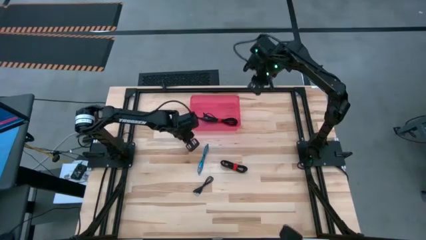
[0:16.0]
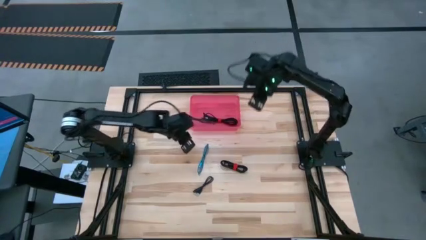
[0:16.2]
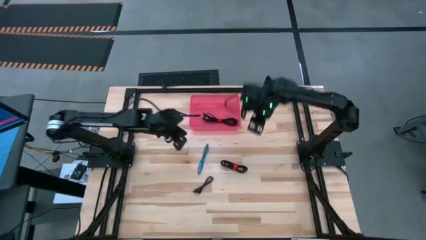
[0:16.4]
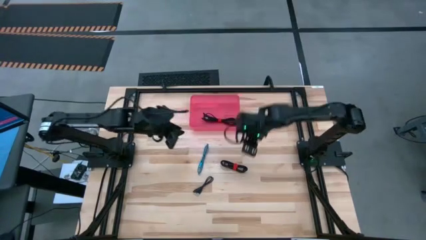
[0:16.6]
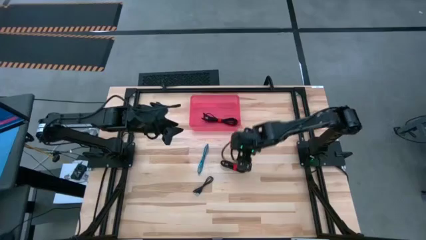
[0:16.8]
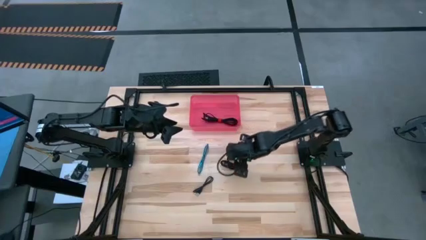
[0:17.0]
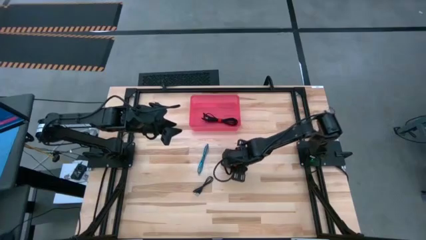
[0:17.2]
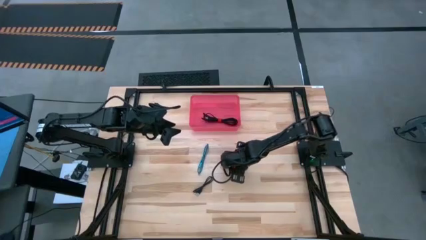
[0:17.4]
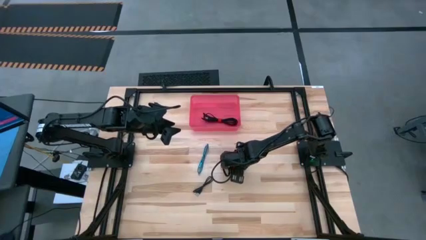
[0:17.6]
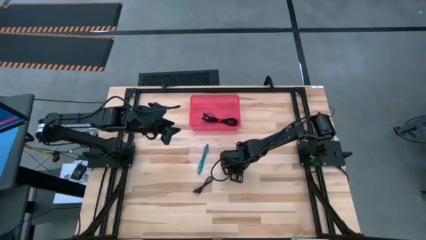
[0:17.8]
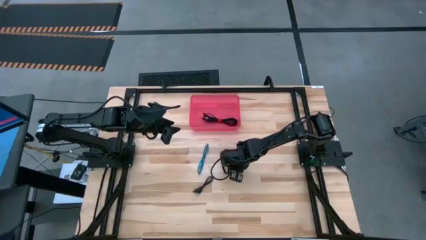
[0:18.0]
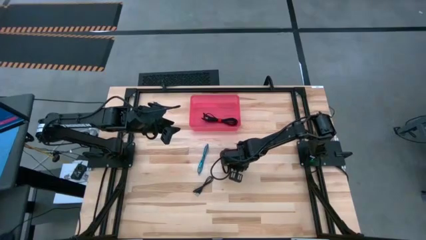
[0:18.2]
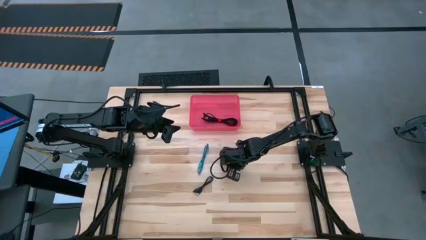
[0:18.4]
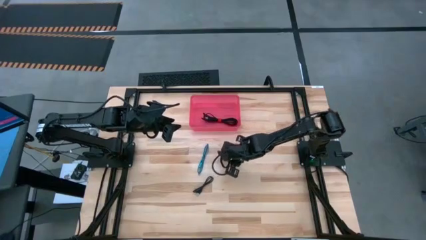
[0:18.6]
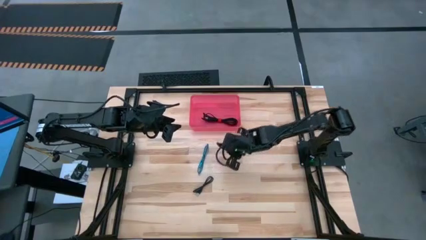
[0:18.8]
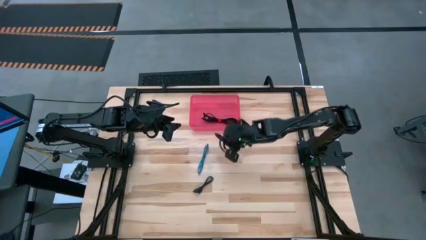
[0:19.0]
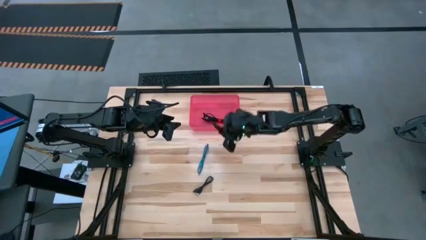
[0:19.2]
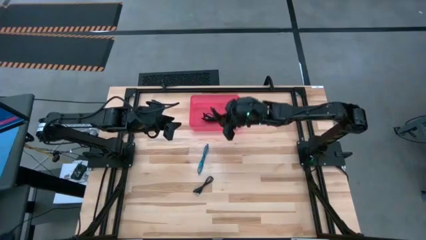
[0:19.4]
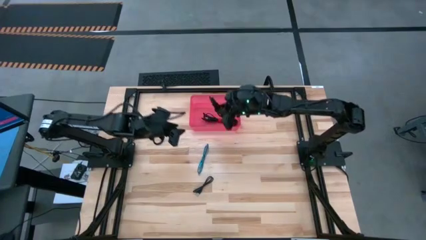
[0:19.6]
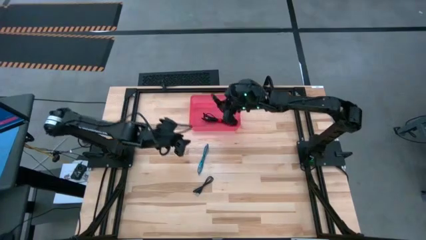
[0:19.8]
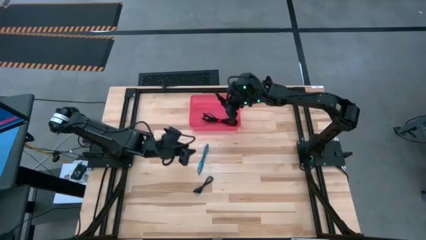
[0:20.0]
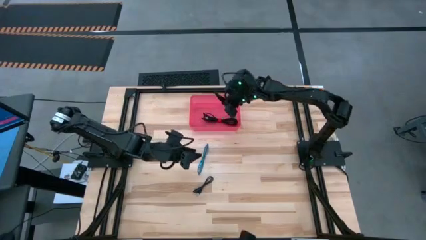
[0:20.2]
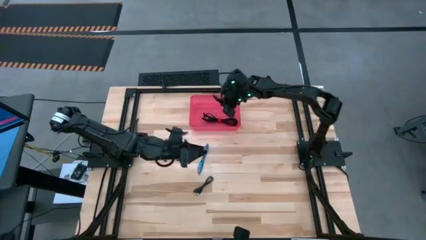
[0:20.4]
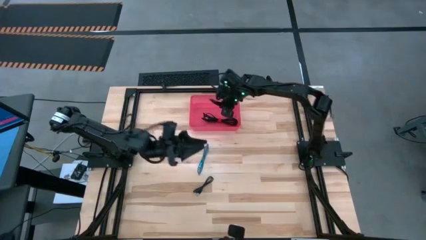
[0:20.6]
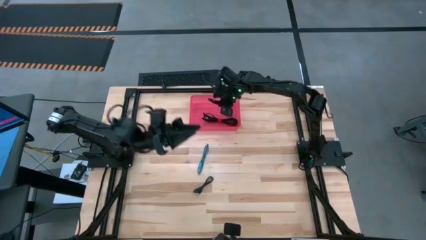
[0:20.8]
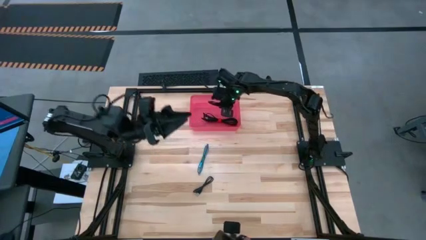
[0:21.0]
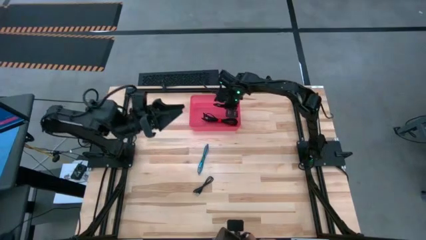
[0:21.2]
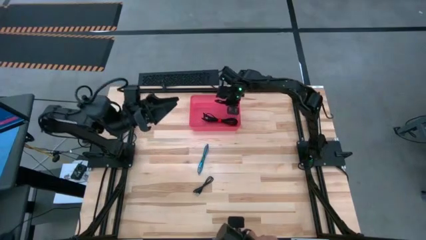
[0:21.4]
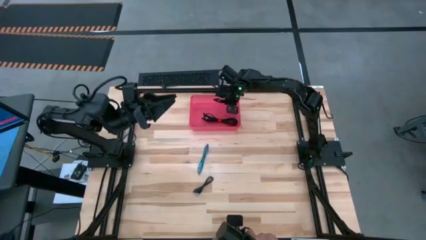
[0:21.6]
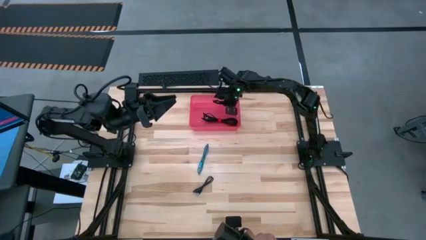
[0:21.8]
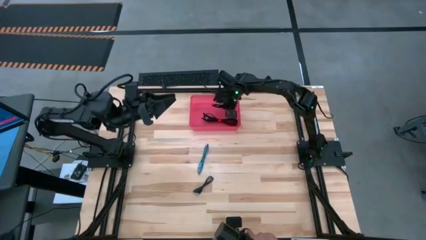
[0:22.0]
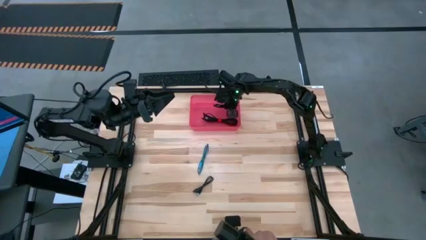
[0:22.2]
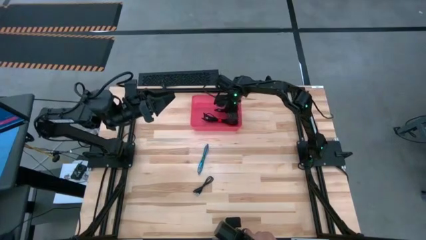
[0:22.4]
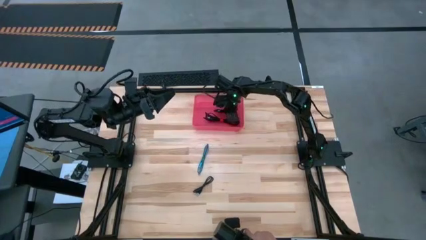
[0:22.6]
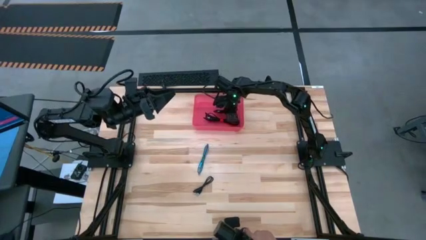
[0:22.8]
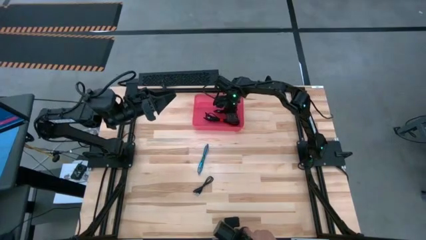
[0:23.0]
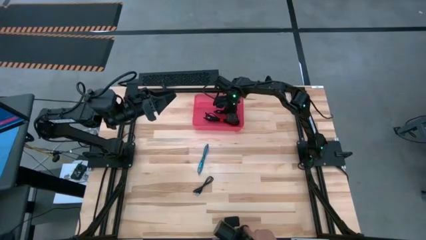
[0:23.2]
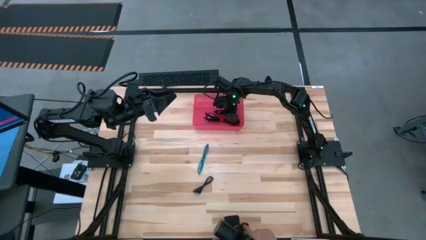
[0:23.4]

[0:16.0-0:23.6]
Task: Pick and place USB-C Cables
Put the right black charger cable into the pink bin

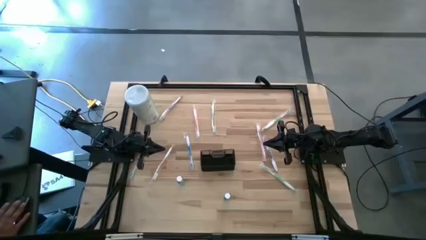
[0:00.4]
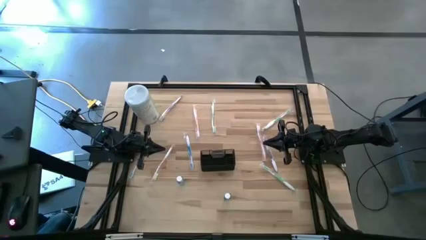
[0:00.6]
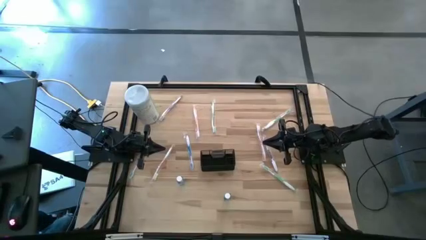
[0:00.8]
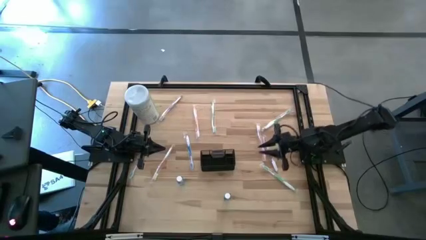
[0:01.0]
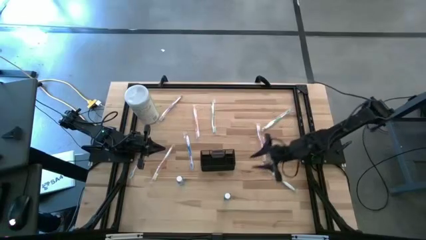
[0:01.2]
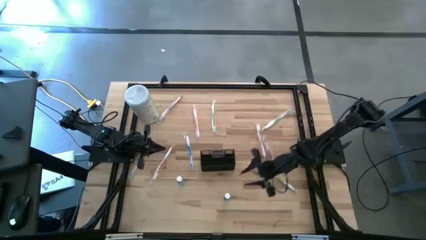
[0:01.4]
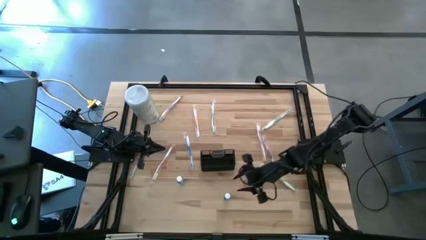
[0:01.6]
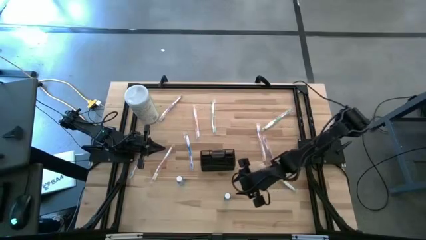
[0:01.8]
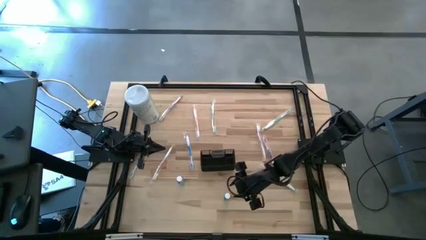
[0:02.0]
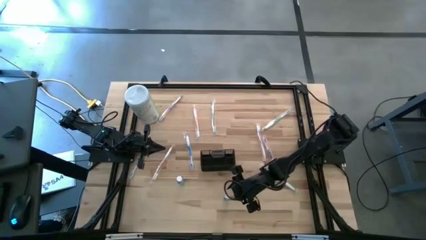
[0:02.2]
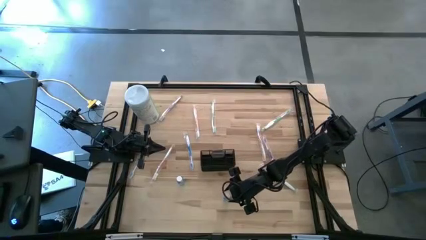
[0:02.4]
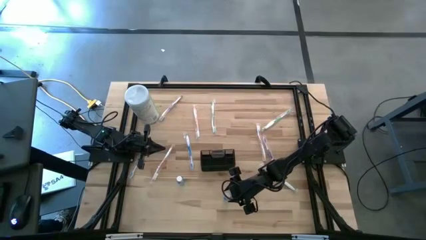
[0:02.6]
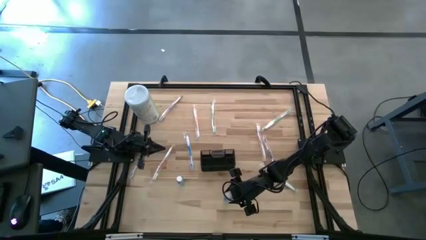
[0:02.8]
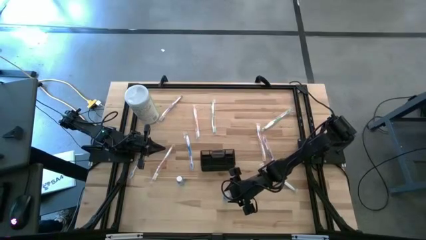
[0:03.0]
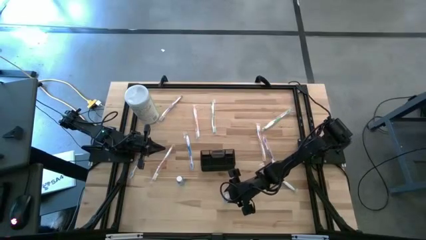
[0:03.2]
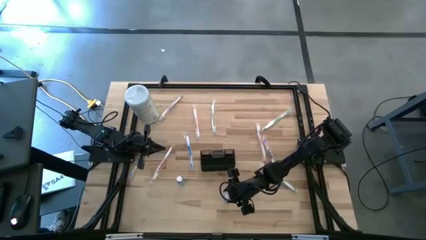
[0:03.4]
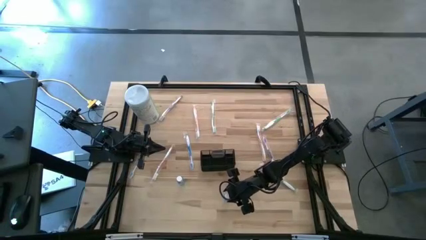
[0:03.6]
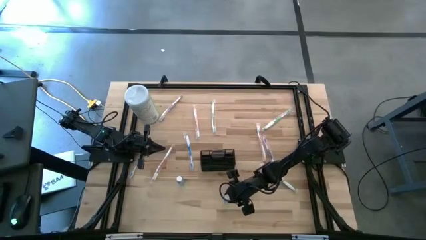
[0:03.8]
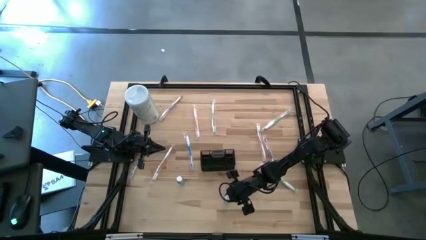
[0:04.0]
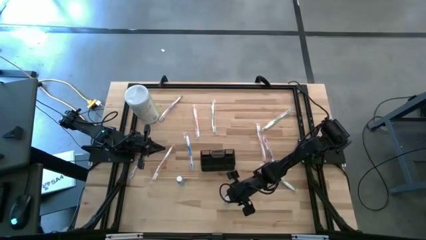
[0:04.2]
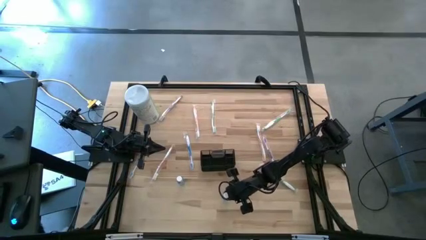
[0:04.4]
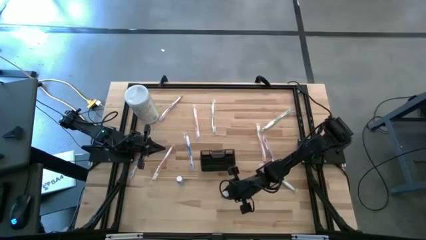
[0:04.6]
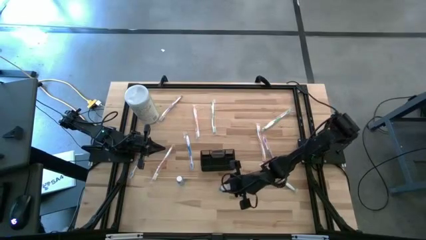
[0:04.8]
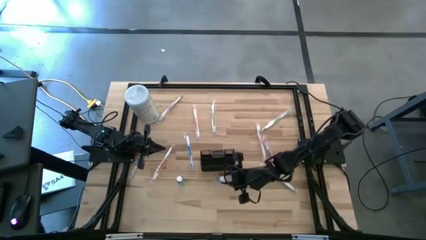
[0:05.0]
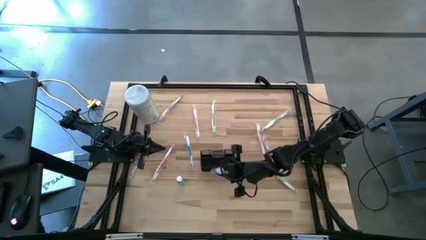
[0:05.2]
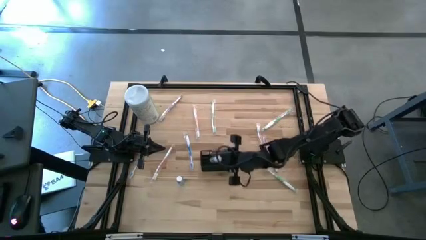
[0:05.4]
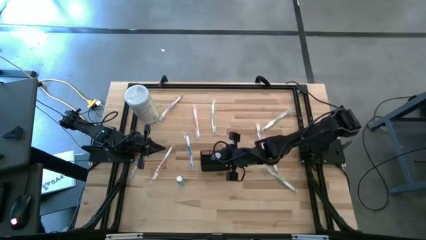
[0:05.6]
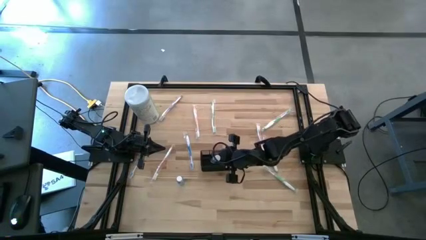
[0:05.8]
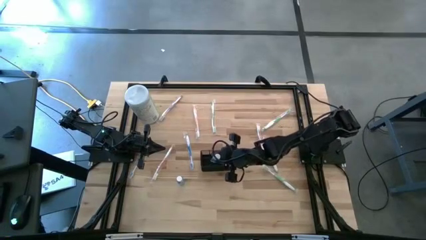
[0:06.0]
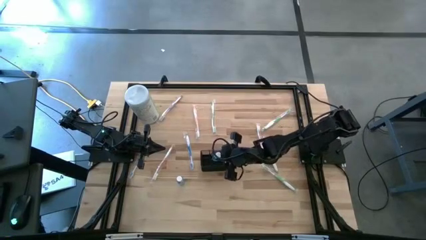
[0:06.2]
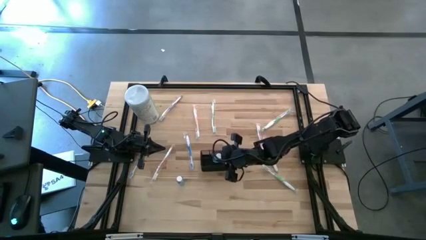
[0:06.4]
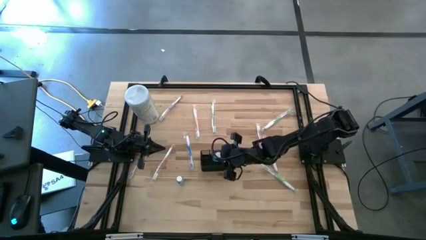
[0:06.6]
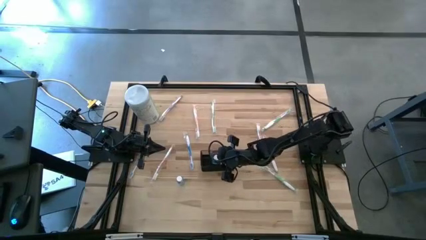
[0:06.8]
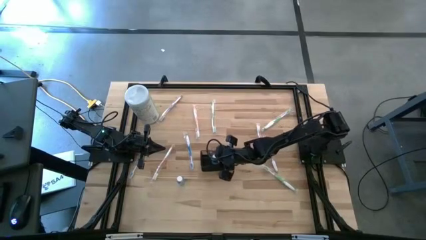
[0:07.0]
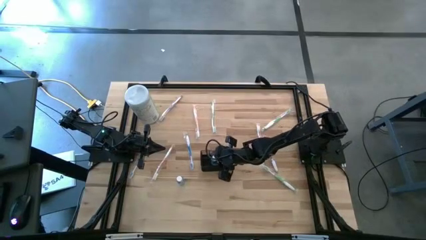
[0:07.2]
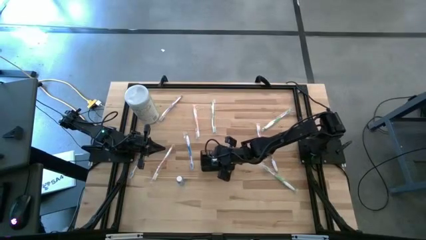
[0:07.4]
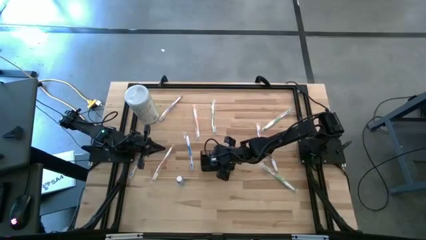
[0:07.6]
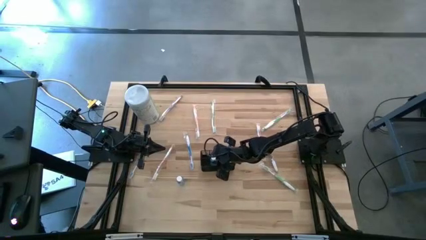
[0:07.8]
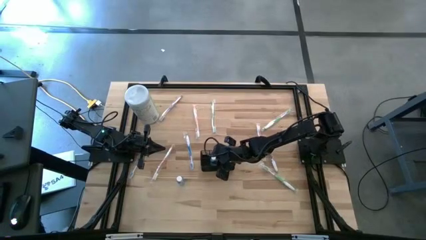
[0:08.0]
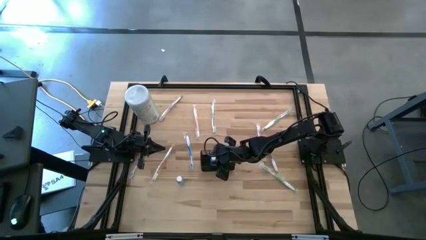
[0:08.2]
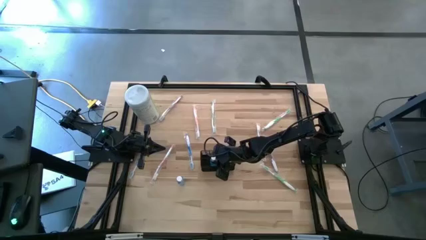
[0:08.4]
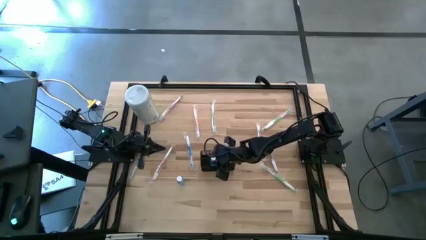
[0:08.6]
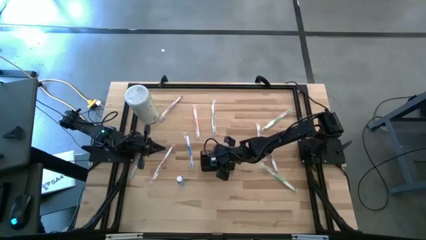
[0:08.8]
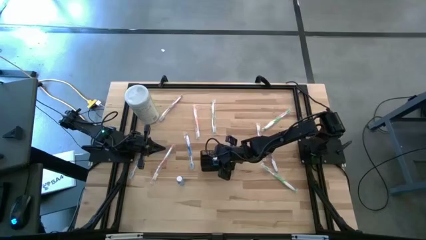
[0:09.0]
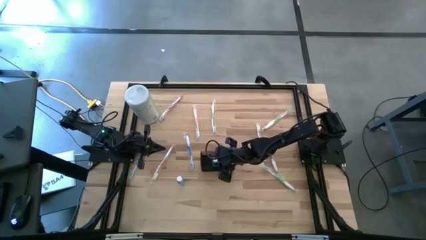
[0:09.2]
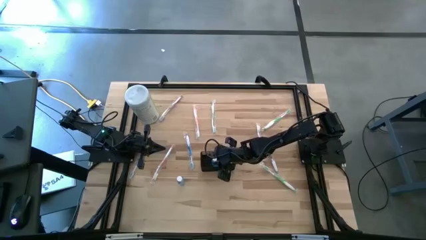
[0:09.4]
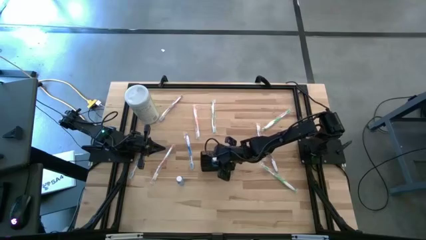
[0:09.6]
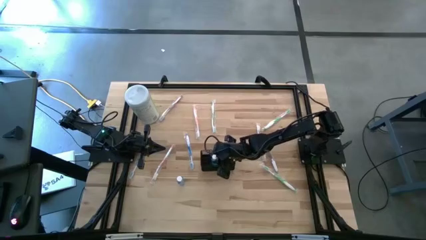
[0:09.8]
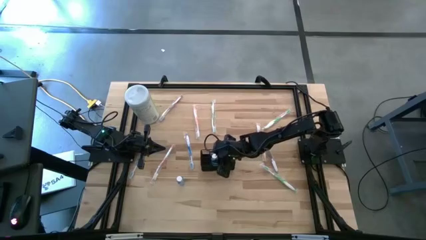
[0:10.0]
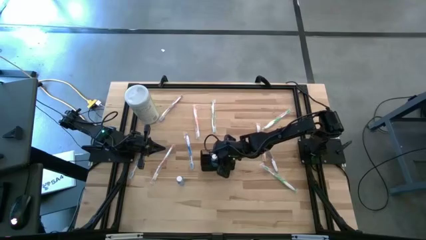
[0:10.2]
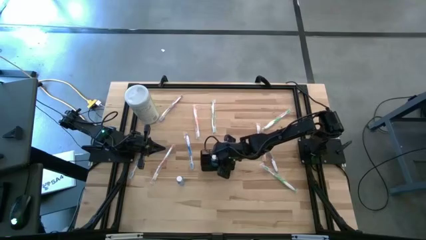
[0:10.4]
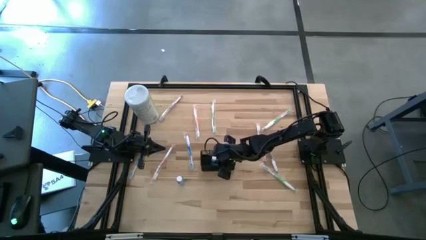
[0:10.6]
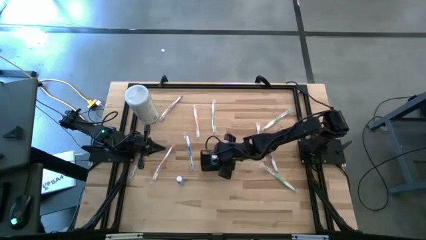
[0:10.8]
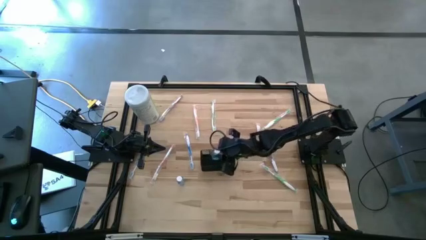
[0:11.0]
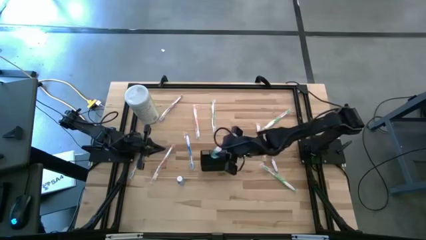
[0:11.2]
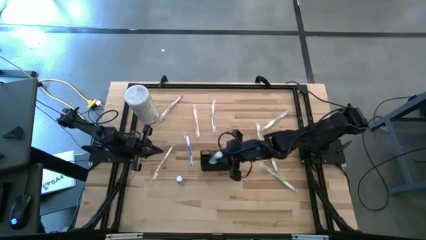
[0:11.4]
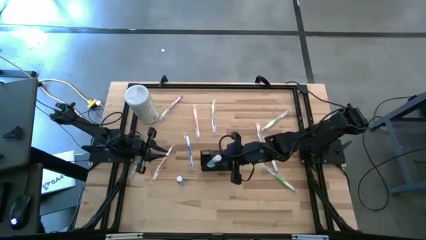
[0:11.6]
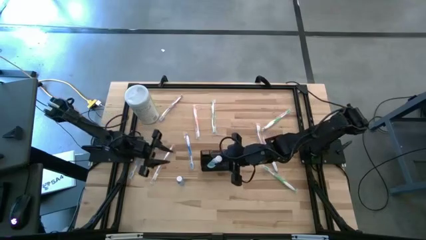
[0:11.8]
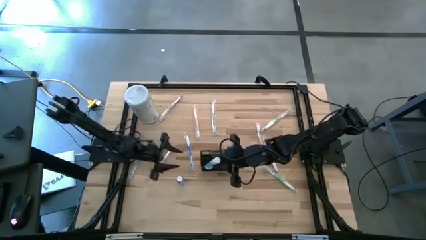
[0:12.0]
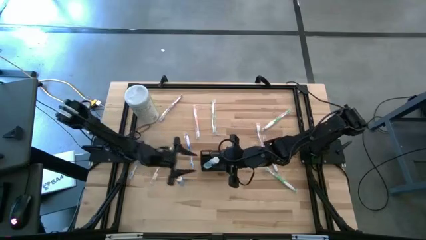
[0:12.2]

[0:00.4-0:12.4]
Task: Pick & Place toothbrushing station
Put the right blue mouthwash into the black wire organizer
